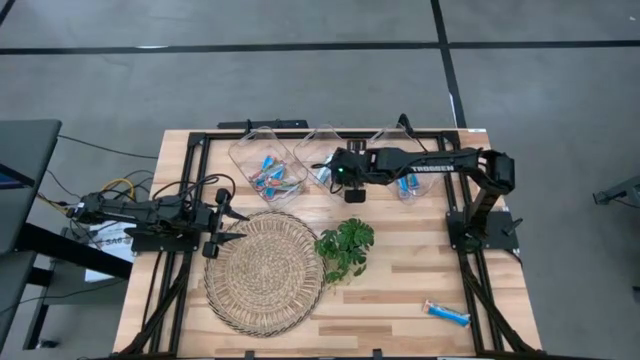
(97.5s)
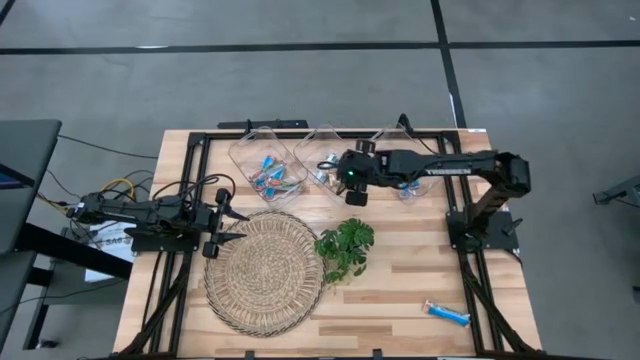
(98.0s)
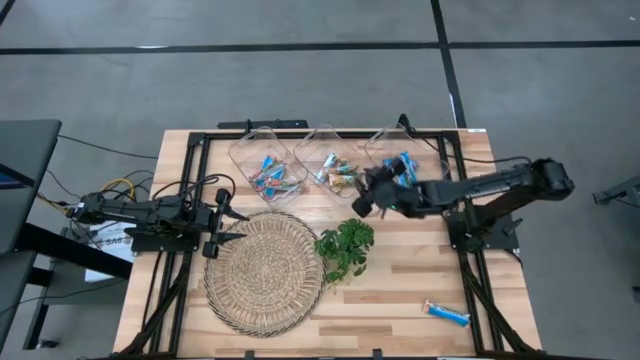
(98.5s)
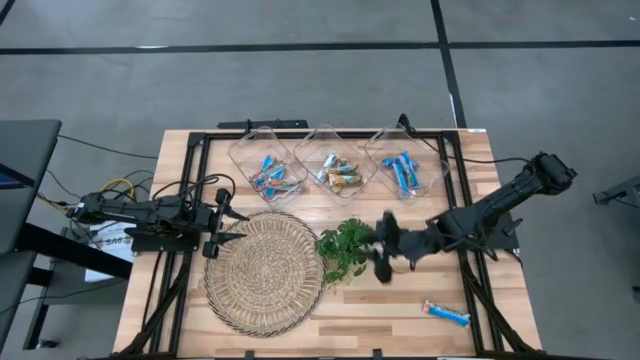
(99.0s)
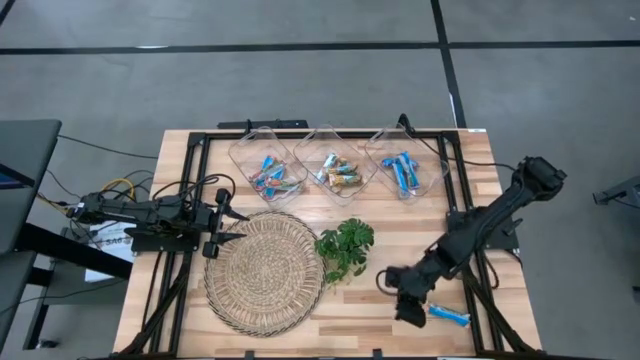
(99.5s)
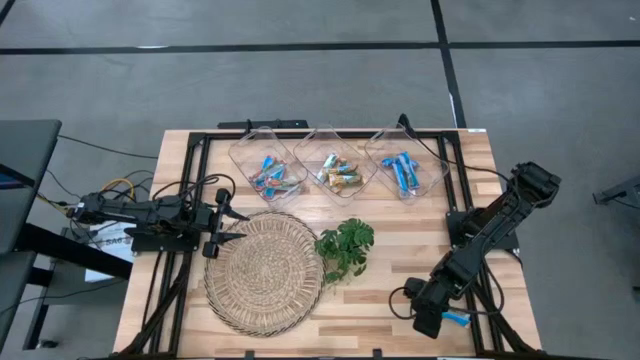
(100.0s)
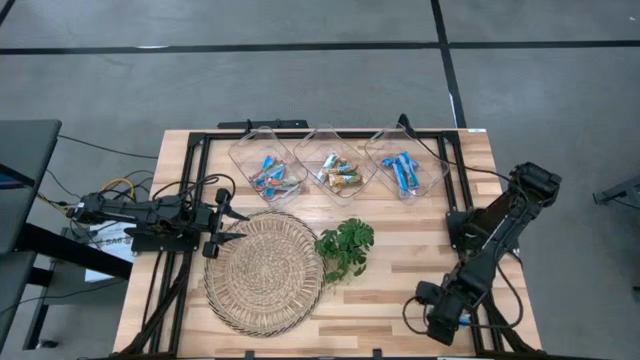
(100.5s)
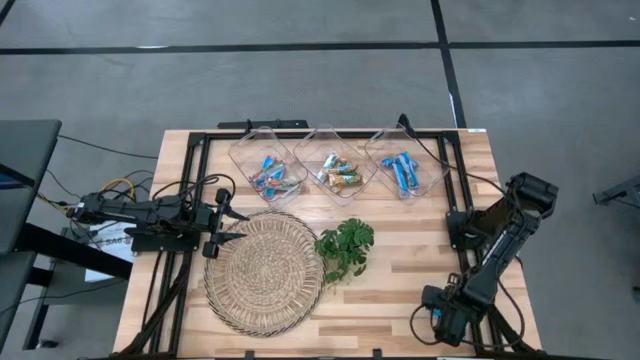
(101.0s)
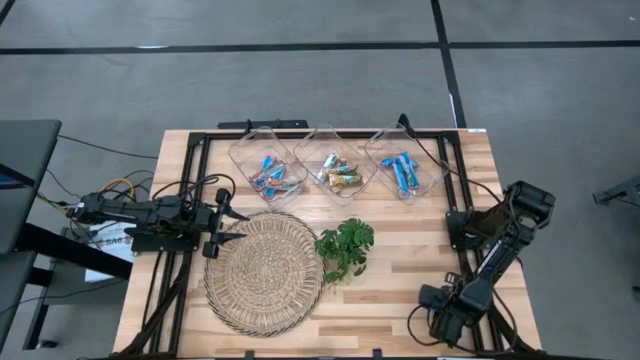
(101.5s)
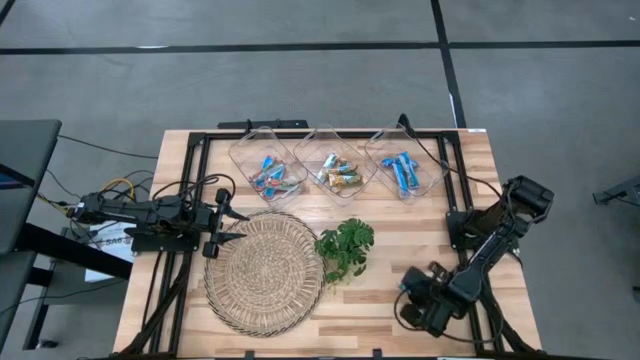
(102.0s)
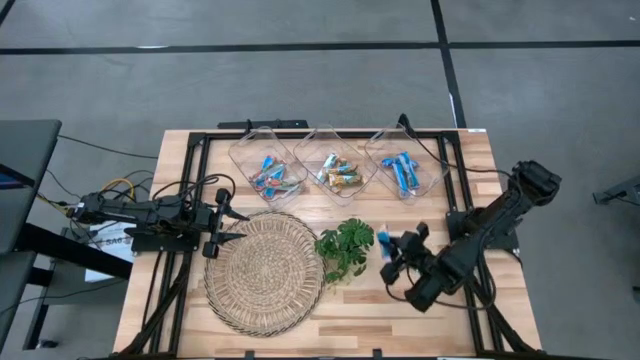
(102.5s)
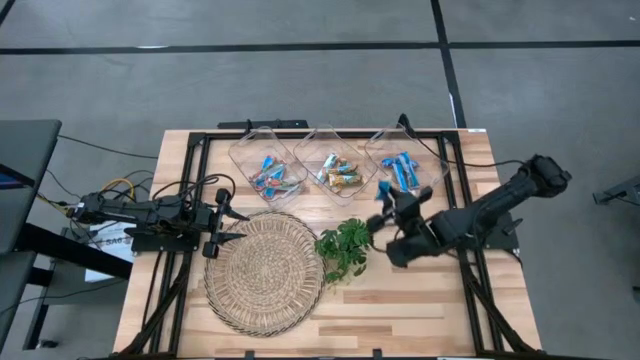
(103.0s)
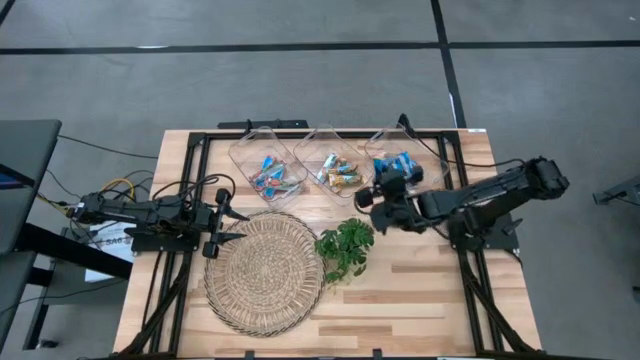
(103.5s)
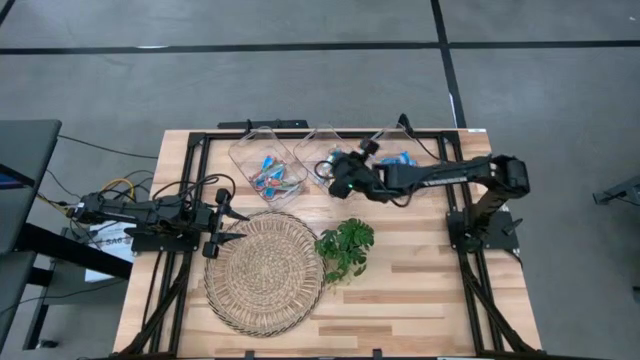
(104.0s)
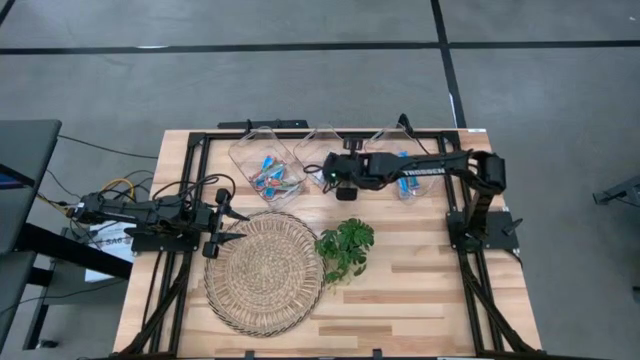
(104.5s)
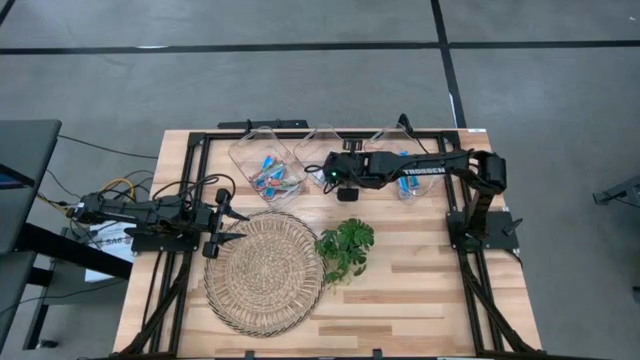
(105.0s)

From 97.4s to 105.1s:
Task: Pick and place Granola Bars by type
Put the yellow granola bar into the middle transparent bin

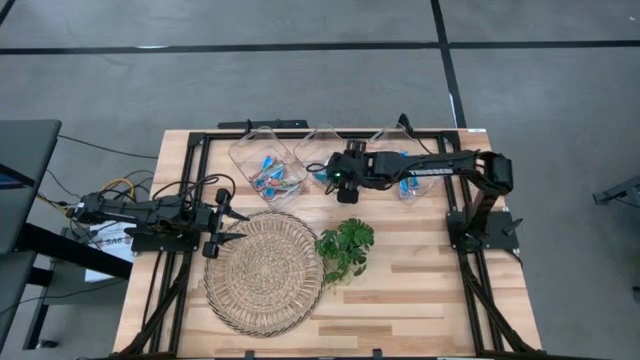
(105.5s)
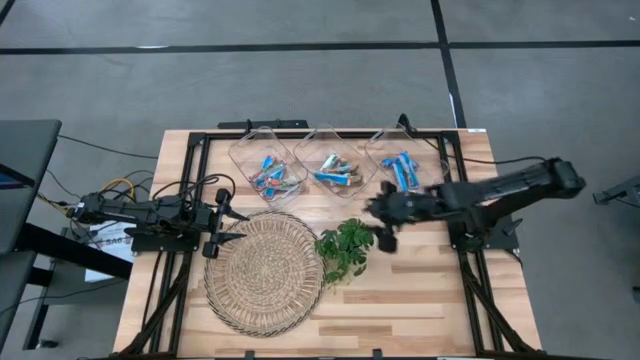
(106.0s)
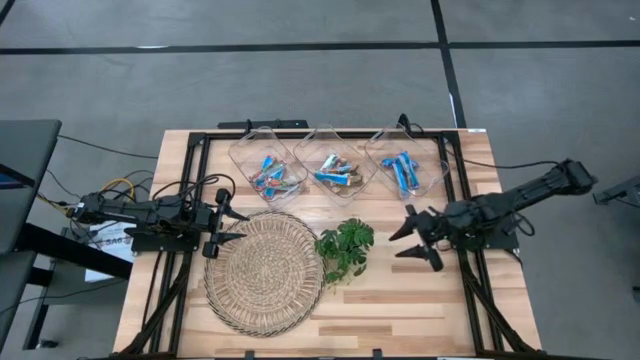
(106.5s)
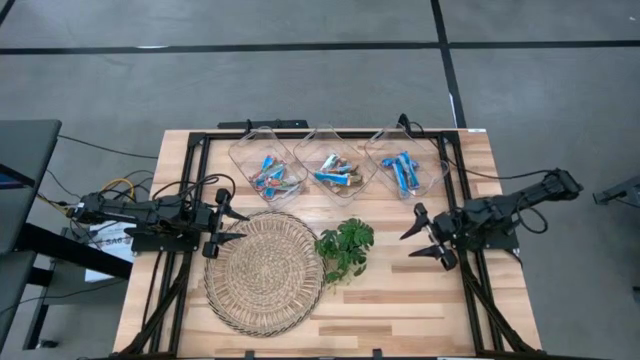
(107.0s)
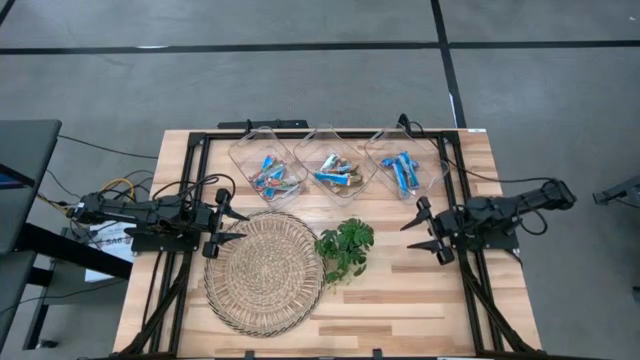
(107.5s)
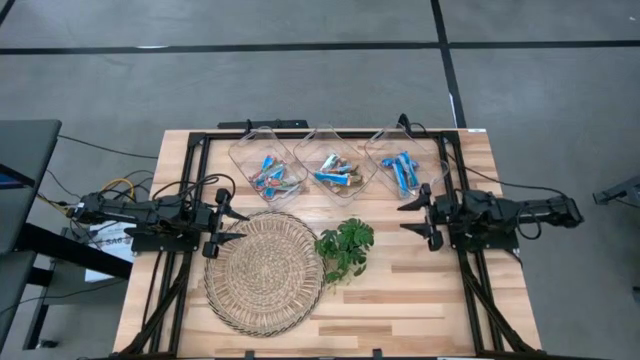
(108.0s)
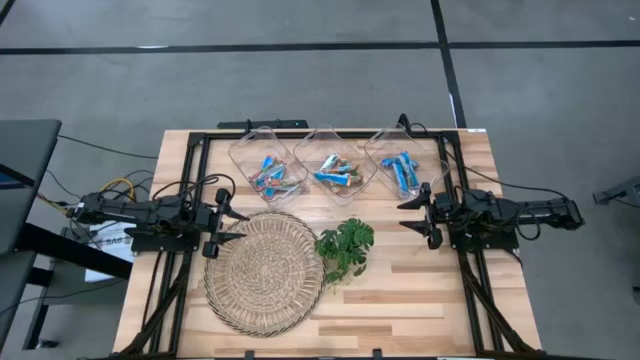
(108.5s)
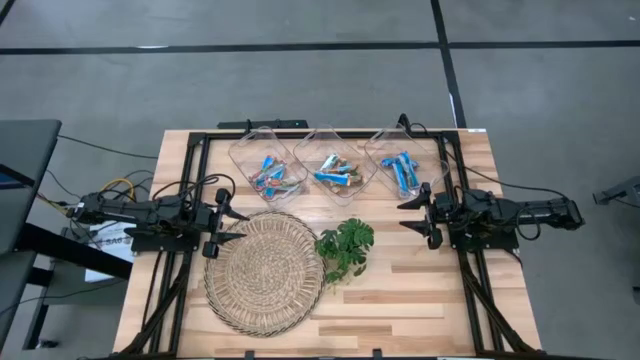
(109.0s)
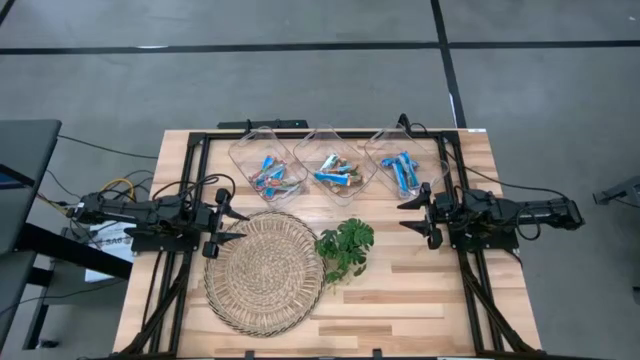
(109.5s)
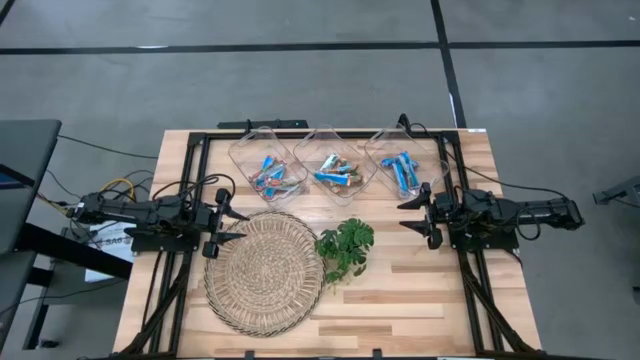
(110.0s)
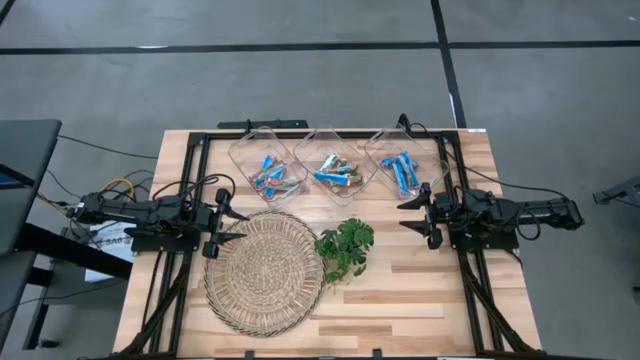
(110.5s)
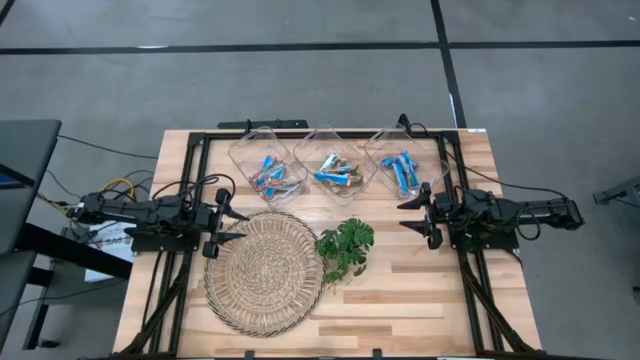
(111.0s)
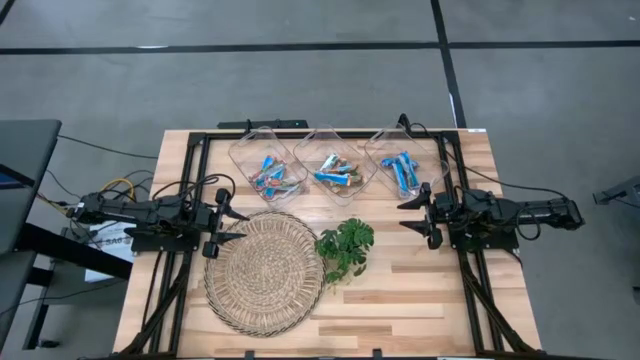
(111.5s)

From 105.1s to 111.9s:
Return to Home Position

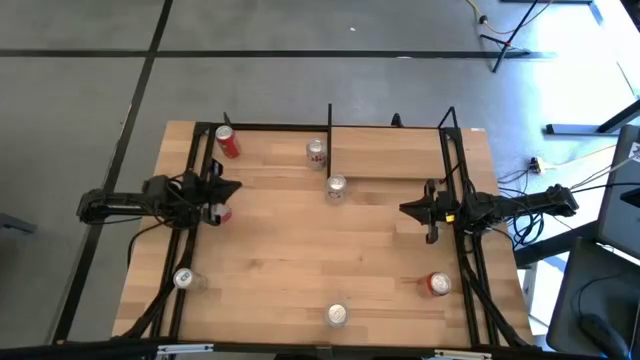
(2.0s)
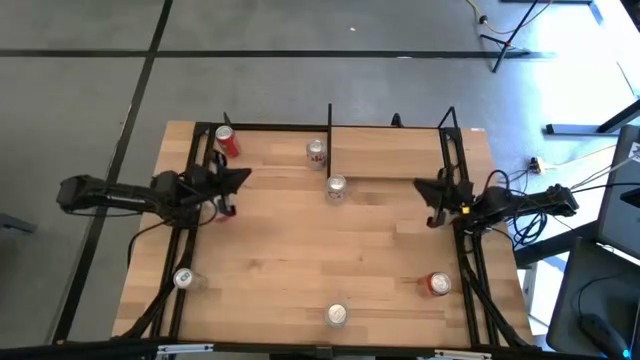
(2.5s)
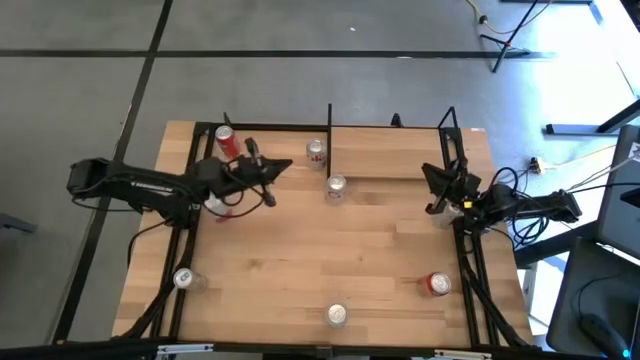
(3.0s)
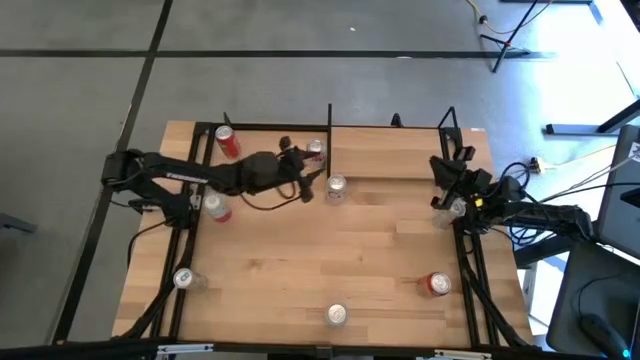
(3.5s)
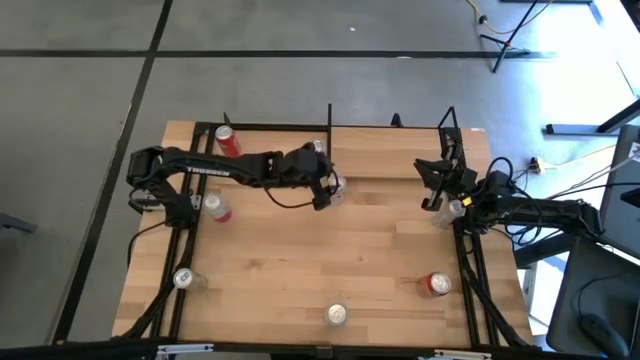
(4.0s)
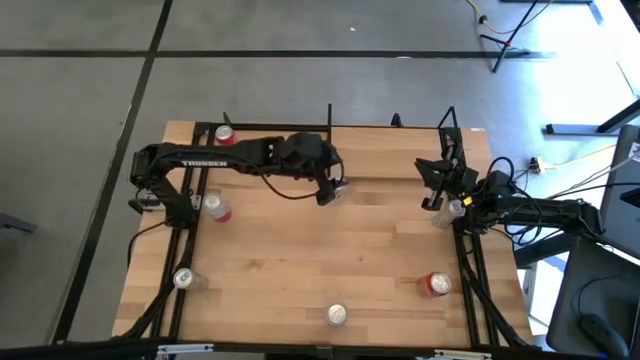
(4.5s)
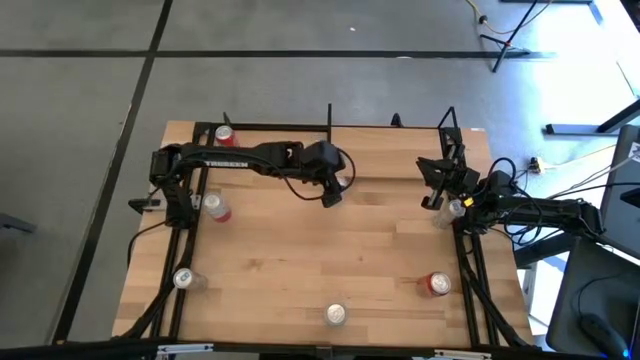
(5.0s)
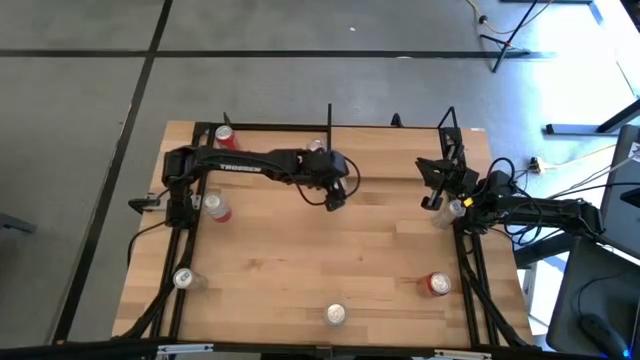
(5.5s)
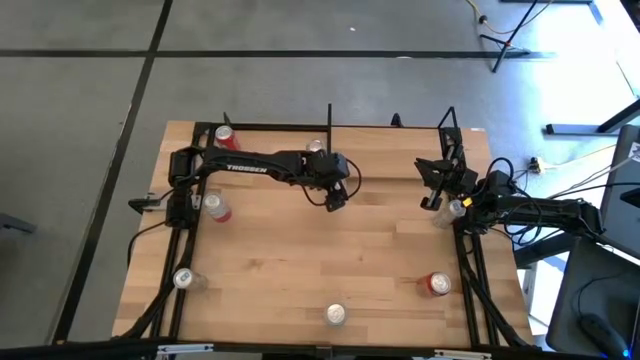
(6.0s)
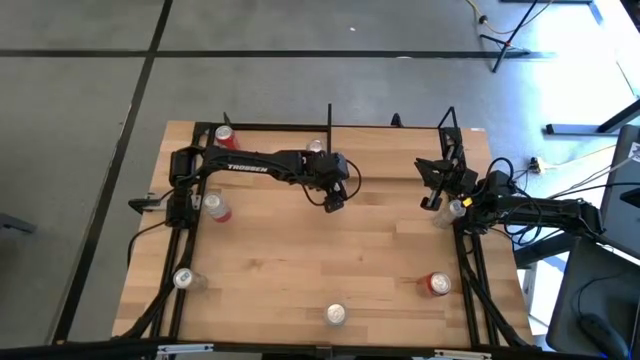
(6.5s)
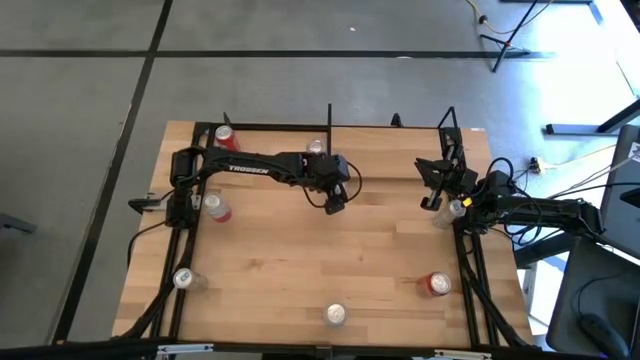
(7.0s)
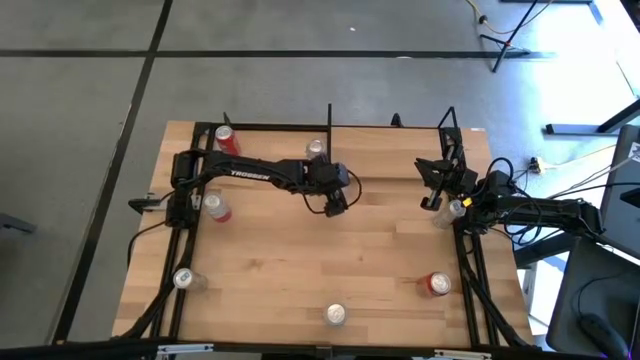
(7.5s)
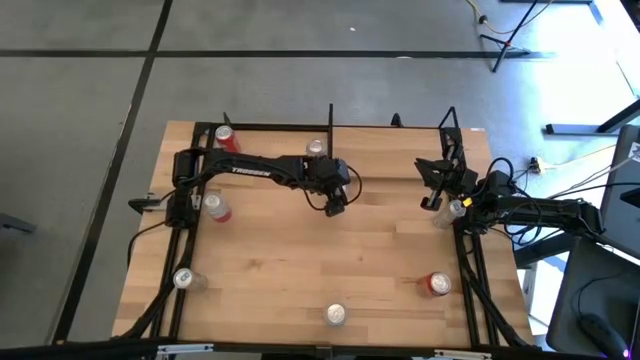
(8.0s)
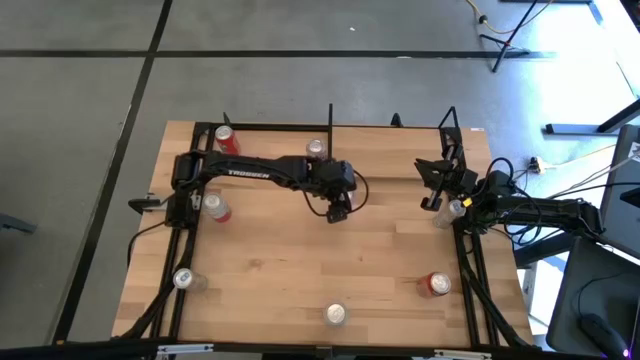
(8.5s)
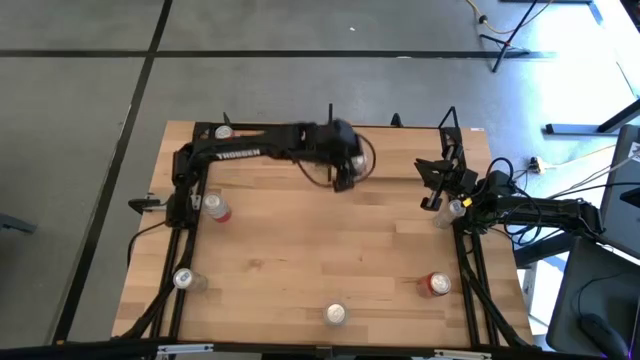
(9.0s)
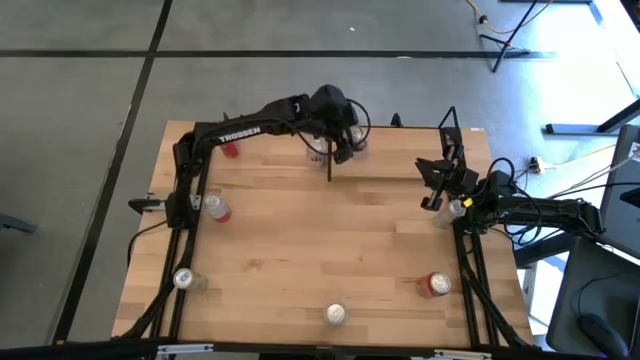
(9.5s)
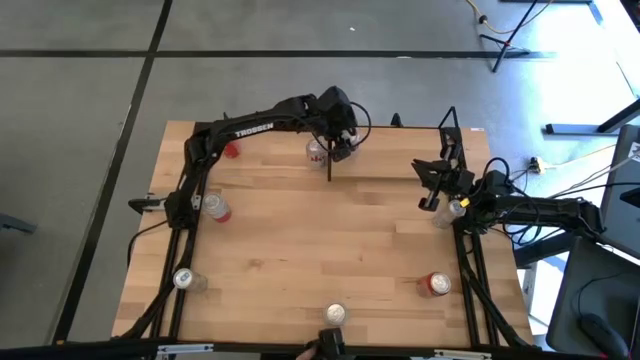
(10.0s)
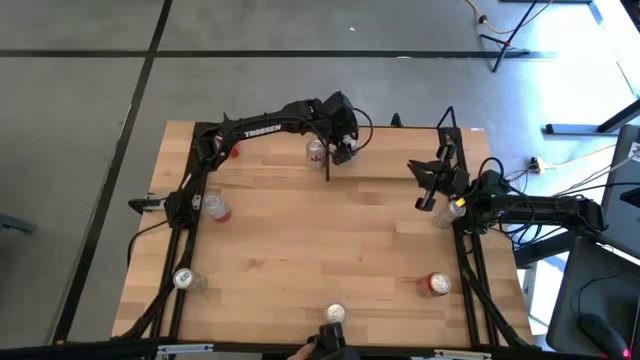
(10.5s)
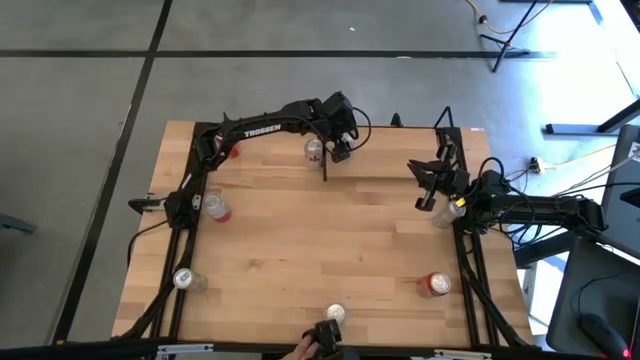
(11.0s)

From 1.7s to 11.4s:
Task: Place canned beverage on shelf
Put the bottom red silver soda can on the shelf
